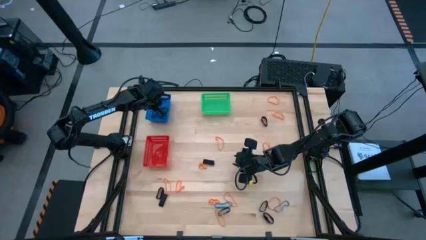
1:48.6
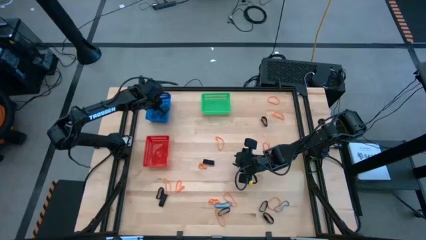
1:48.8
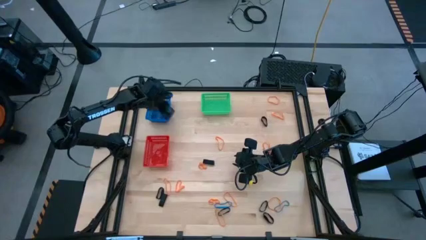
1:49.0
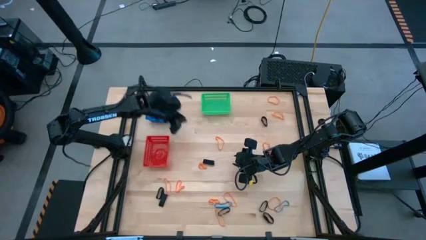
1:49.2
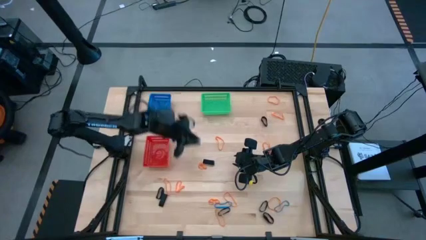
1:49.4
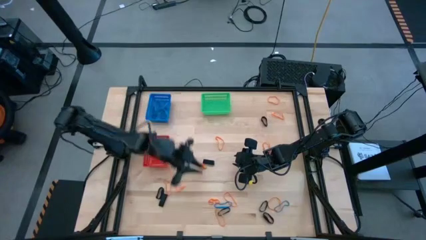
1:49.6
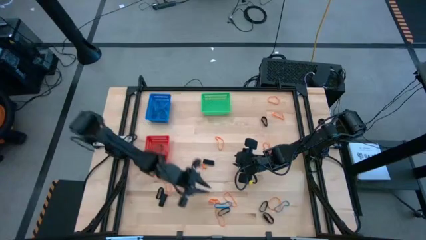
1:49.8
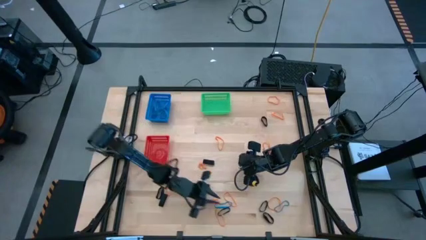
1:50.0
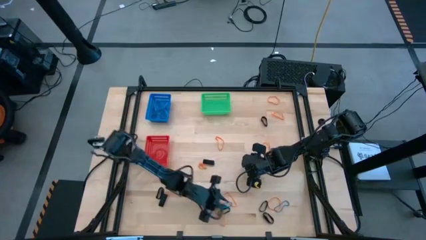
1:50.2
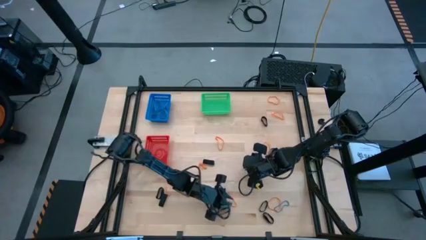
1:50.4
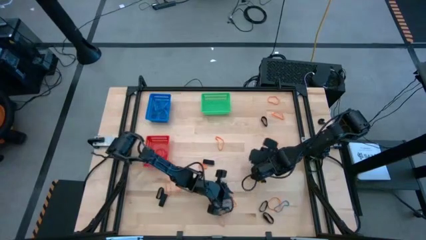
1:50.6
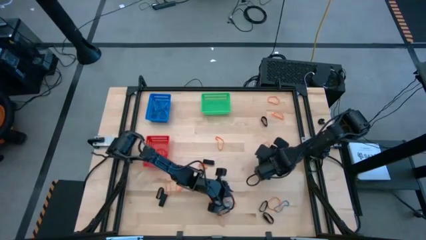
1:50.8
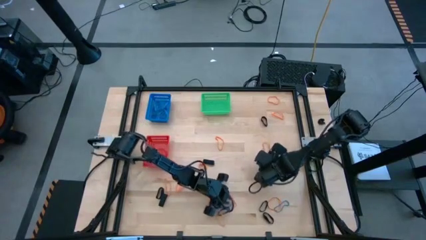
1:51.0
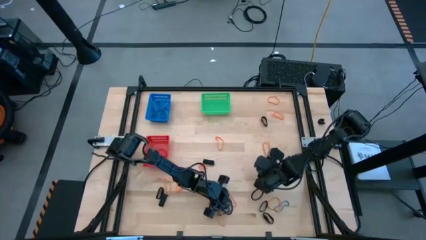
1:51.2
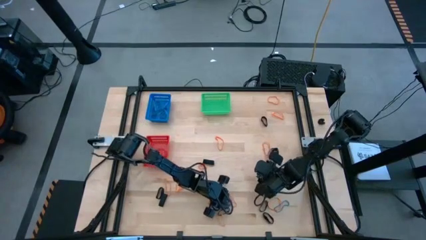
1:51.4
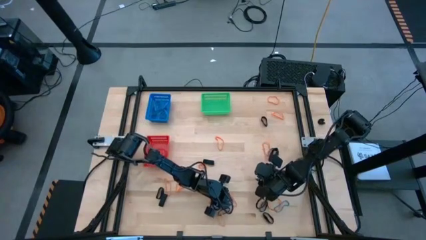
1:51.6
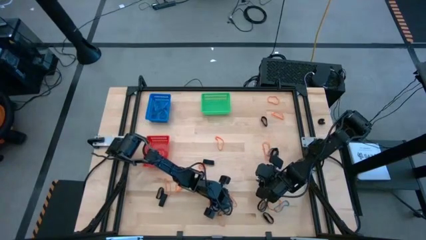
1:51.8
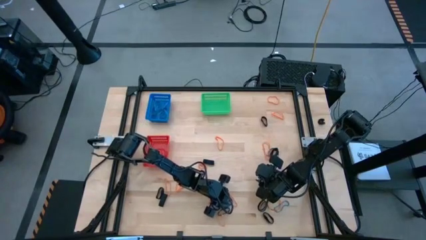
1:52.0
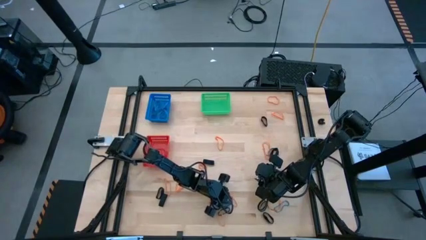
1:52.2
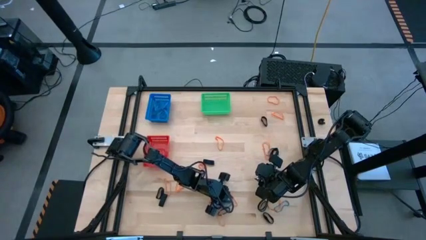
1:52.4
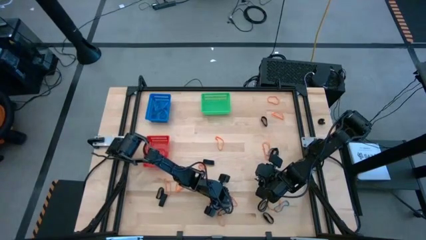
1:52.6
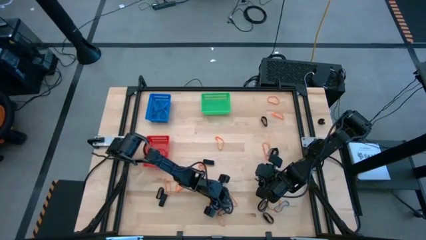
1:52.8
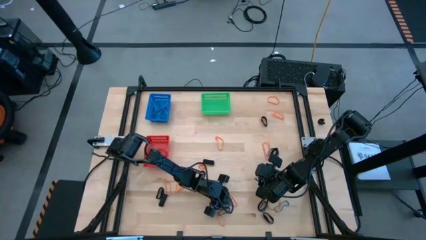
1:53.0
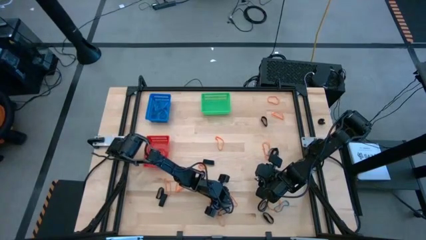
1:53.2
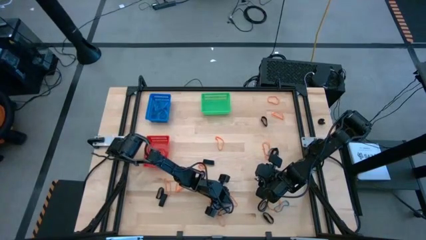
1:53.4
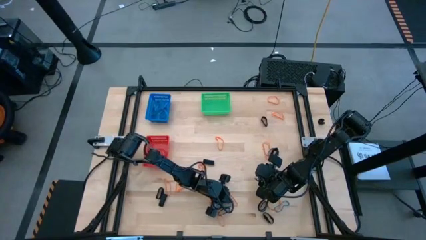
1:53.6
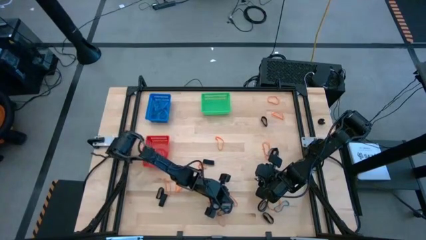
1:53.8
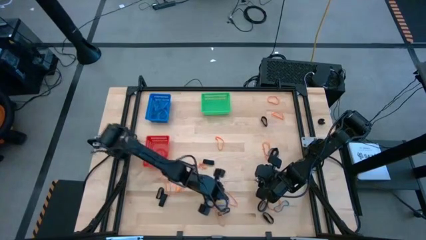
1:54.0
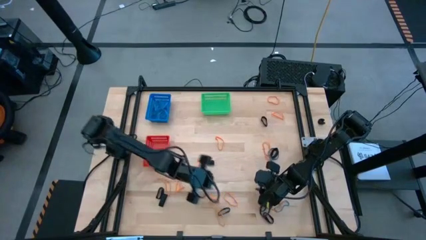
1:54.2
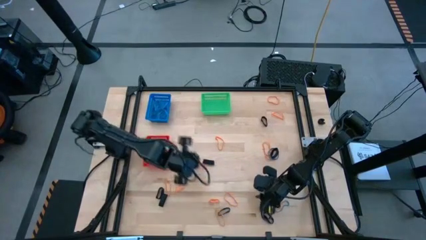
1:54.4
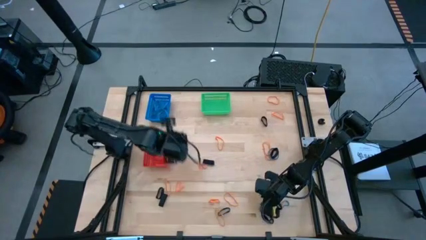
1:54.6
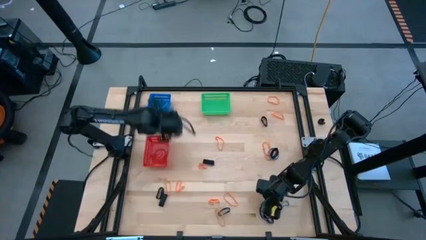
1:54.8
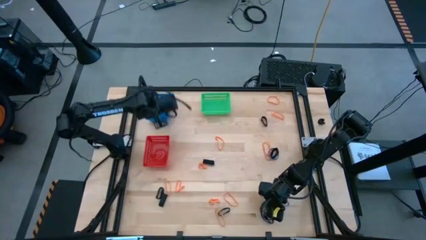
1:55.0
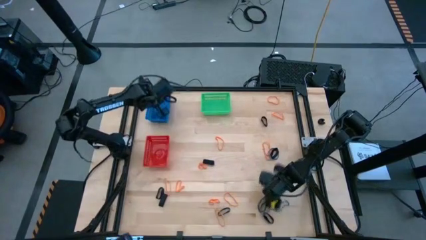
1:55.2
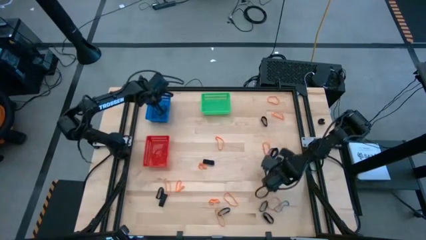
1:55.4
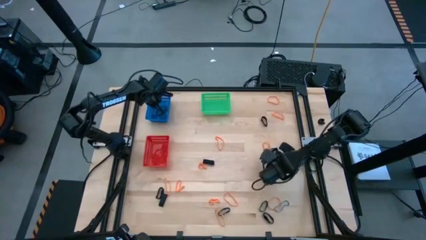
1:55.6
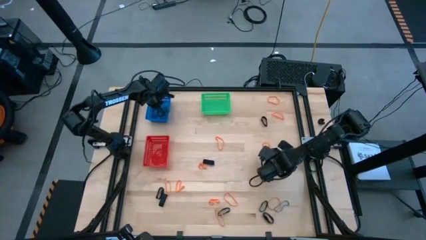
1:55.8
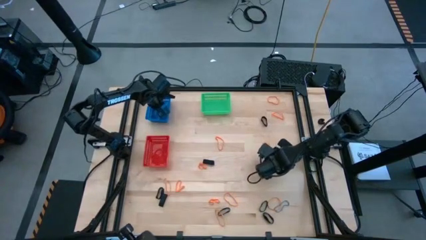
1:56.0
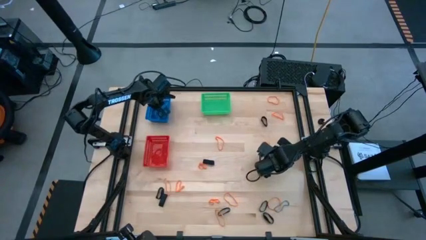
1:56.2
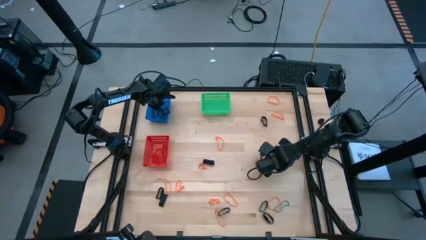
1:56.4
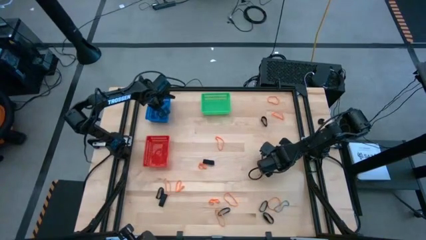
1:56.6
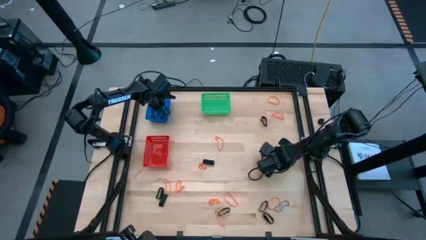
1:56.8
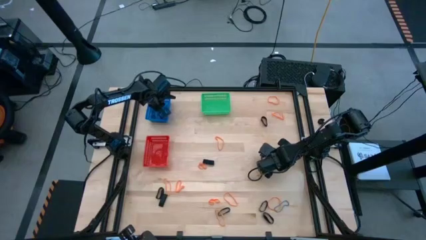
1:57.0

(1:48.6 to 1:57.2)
Task: Sort rubber bands into baskets
Put the blue rubber band into the blue bin

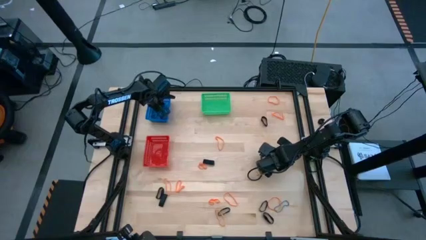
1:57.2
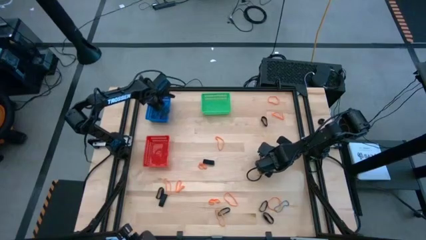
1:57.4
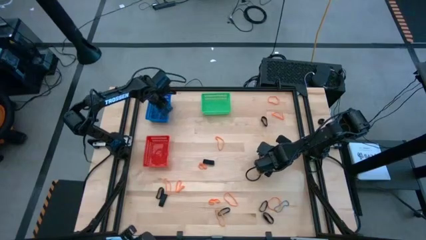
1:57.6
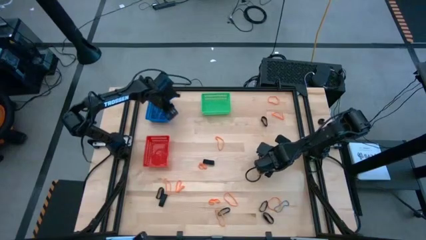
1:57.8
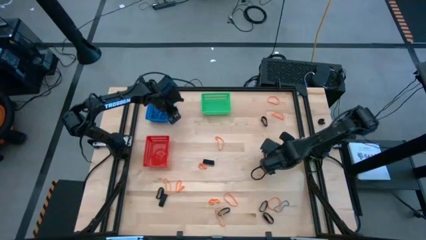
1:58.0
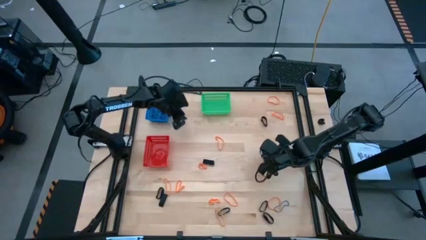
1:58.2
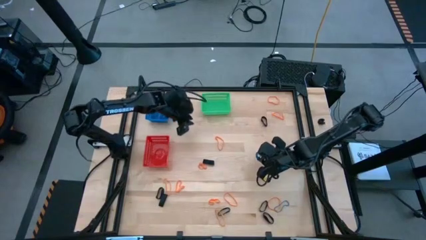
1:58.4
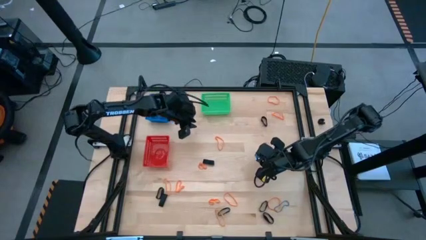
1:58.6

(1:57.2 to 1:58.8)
Put the blue rubber band into the blue bin

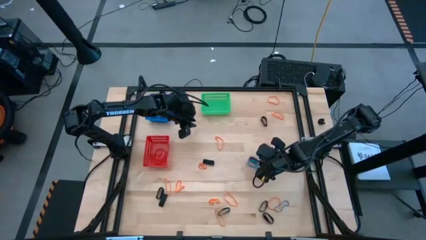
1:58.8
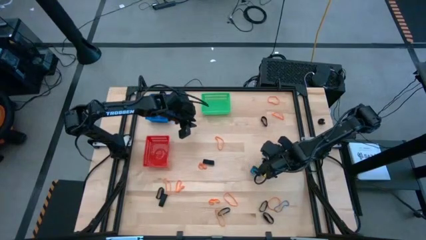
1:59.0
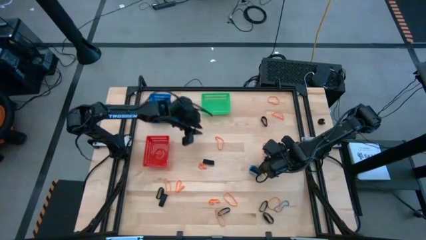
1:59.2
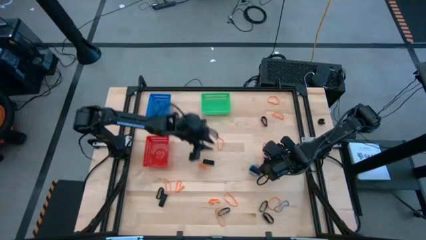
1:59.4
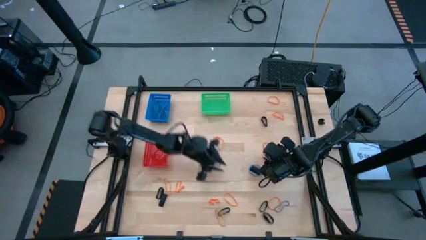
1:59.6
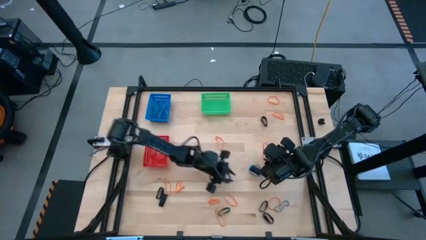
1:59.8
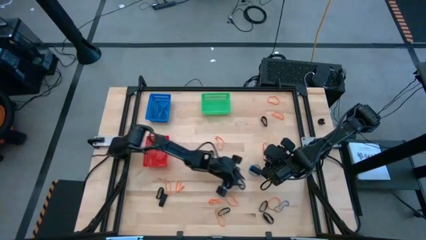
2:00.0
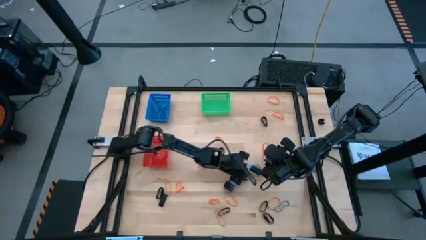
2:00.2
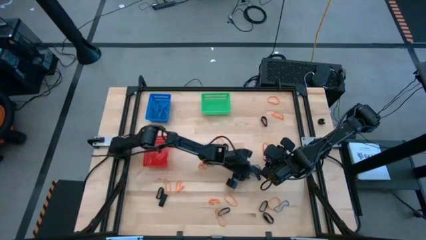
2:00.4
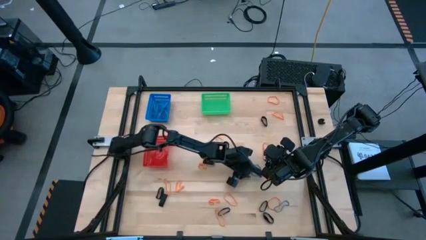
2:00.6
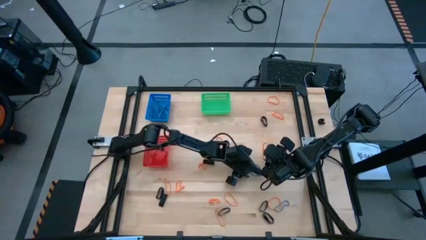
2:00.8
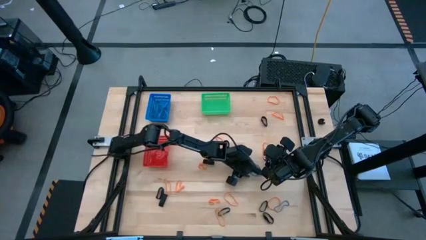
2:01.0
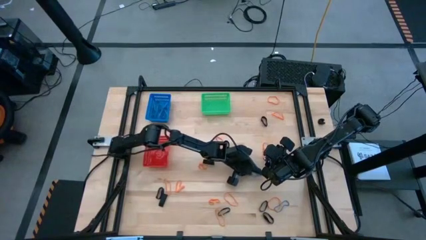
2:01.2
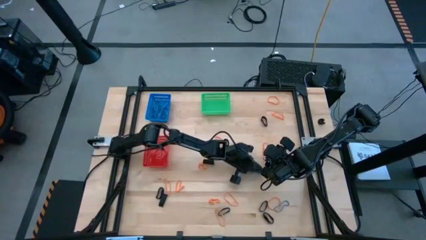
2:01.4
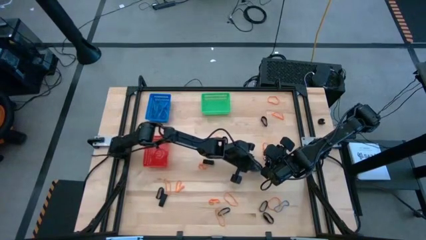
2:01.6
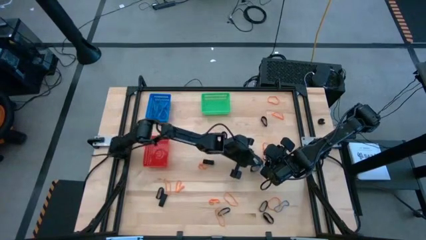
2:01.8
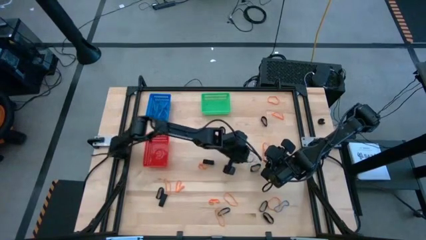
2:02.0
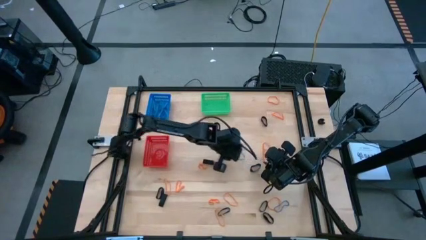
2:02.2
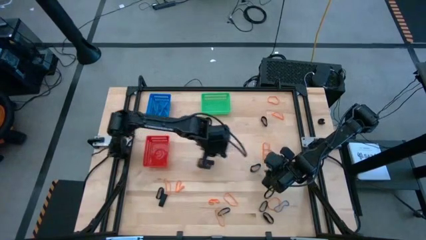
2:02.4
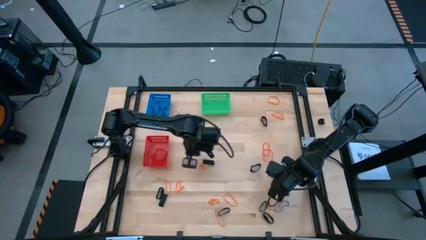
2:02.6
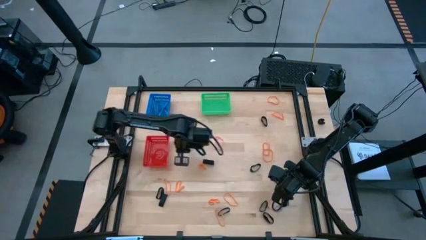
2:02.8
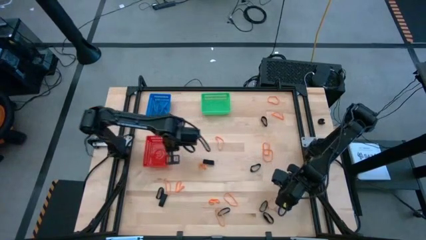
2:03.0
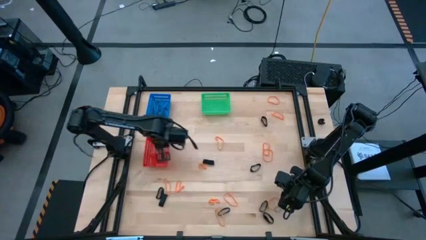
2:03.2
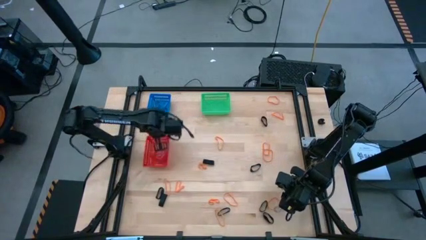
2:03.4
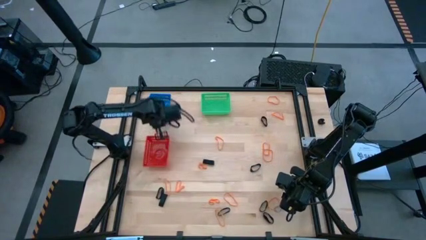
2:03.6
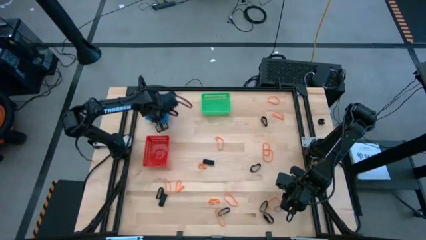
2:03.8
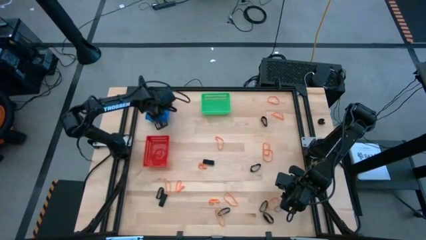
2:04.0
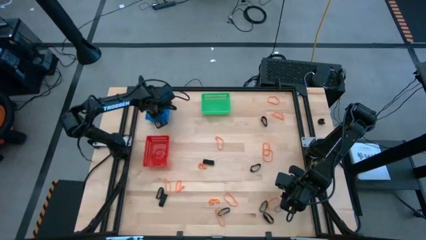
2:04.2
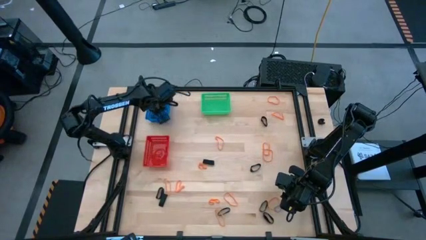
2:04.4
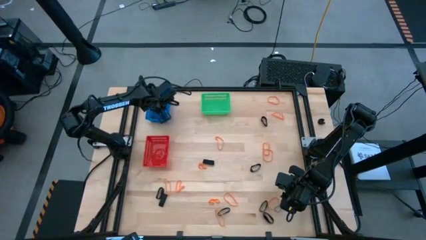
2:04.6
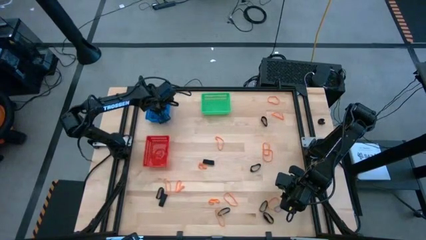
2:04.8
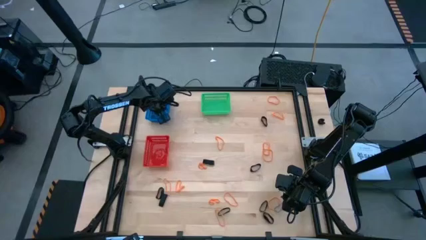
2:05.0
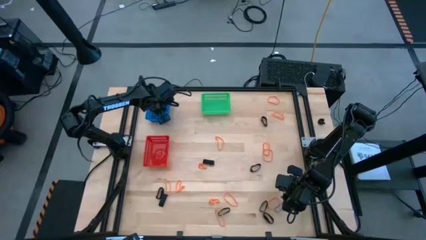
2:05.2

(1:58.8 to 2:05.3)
Put the blue rubber band into the blue bin
